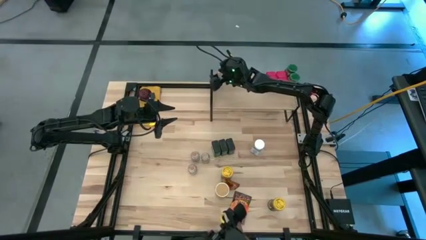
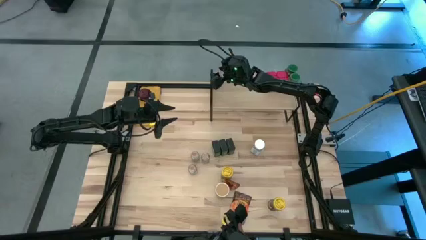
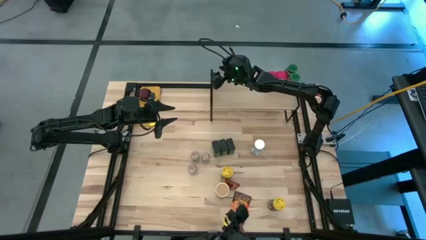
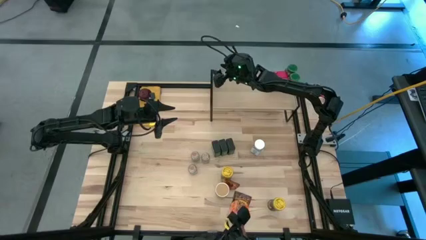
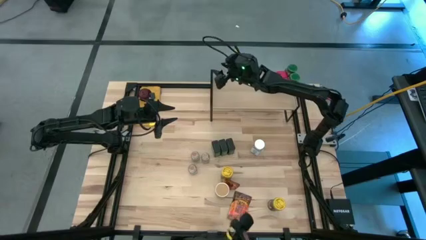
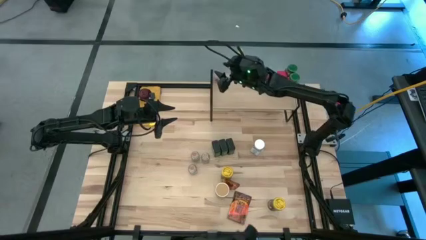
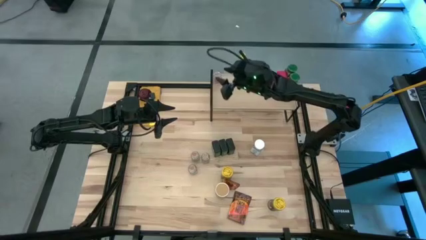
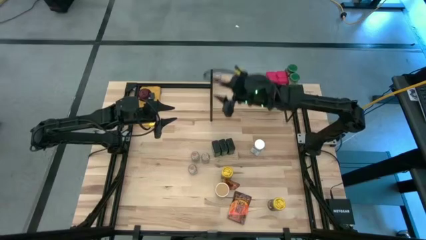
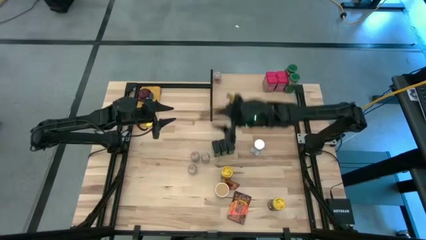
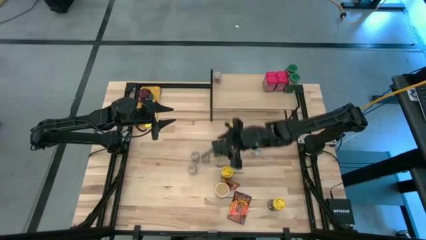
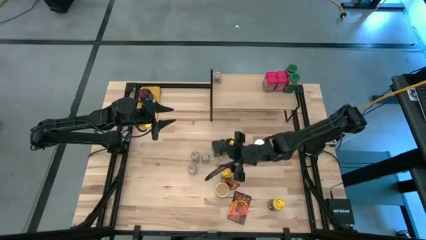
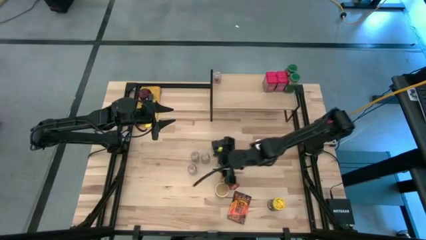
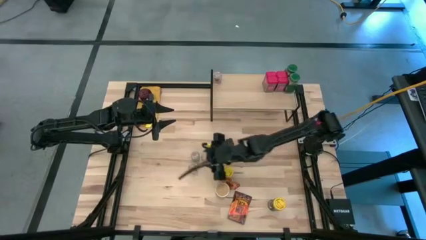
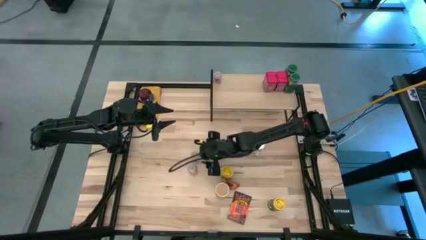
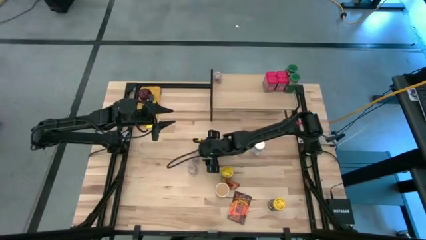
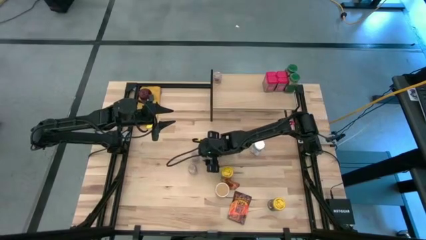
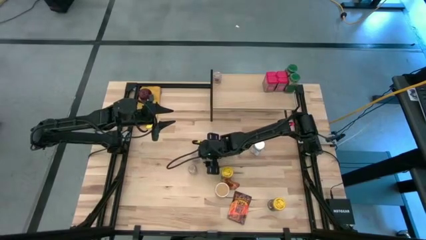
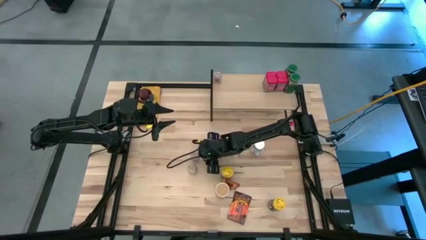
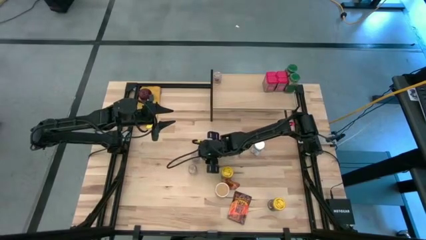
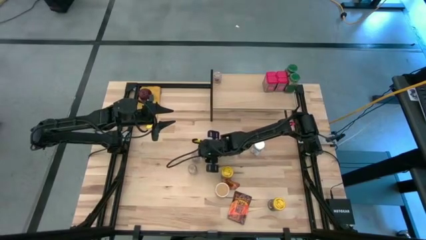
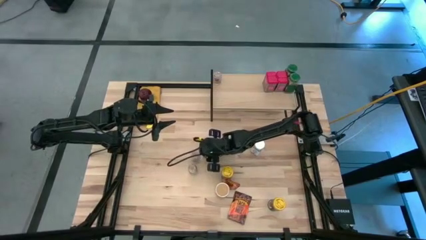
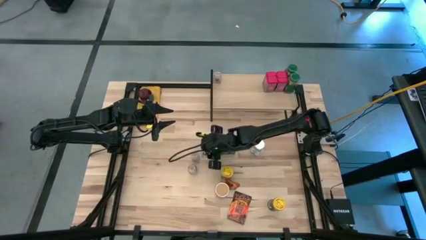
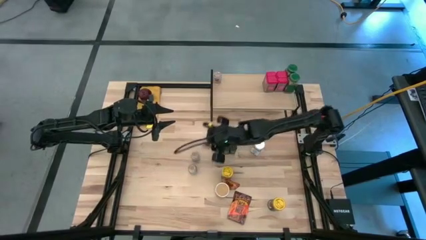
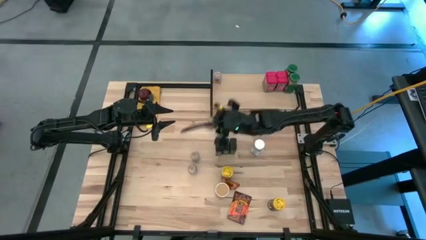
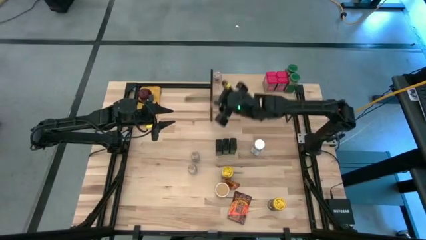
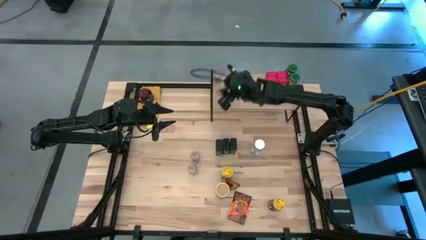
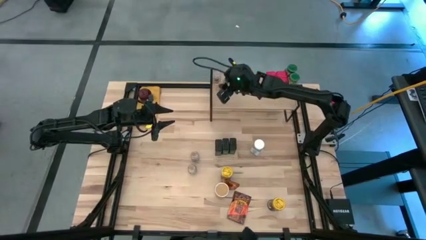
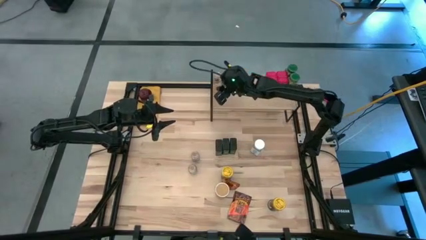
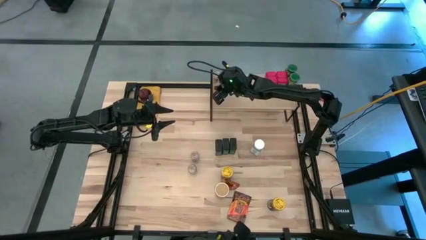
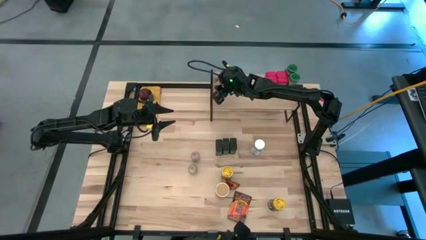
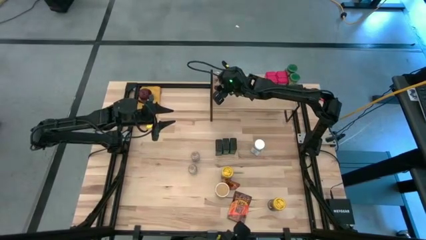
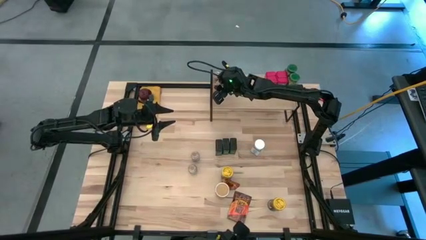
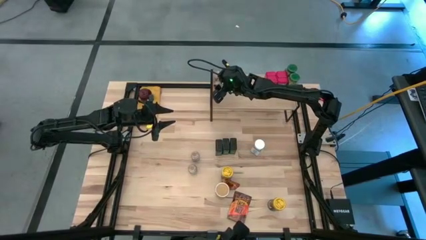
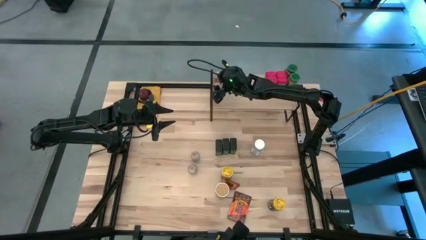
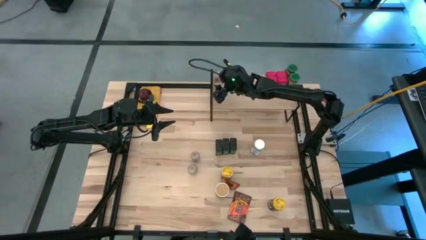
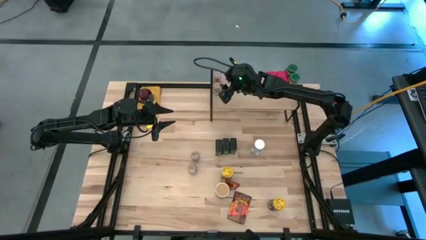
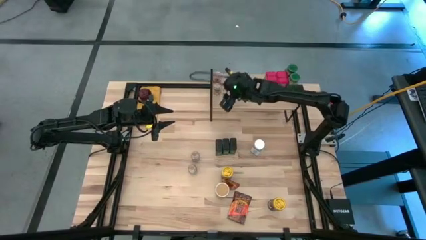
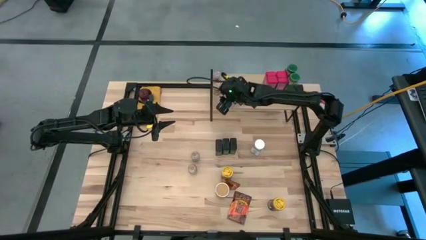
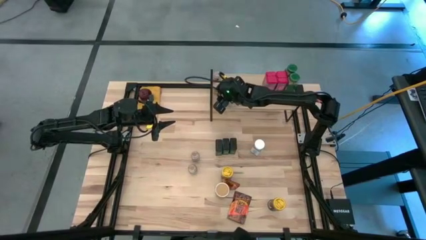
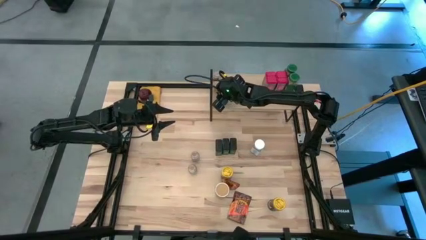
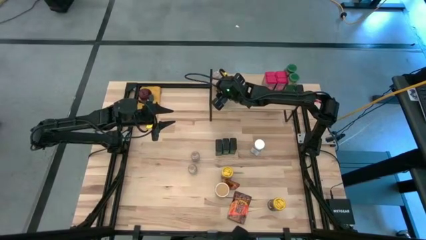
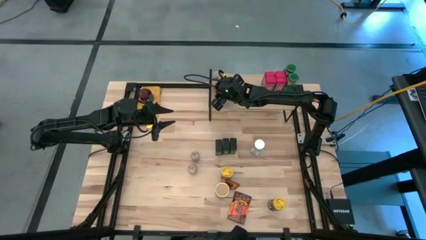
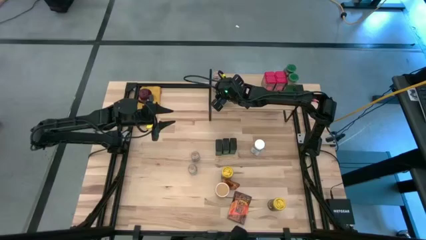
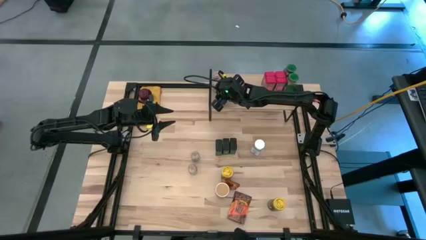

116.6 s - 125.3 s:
Task: Shelf spices
Put the top right brown seasoning bottle on the shelf and align it with the other brown seasoning bottle

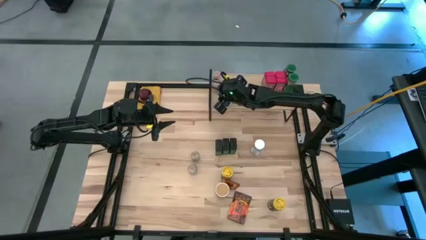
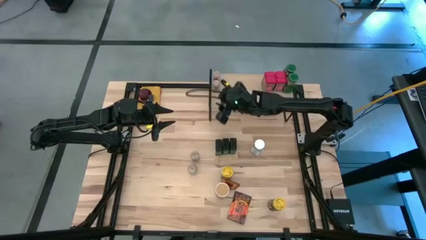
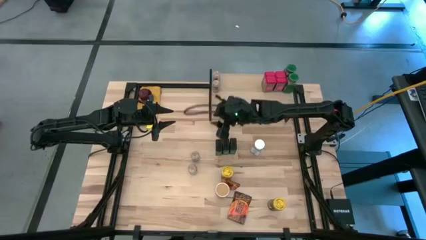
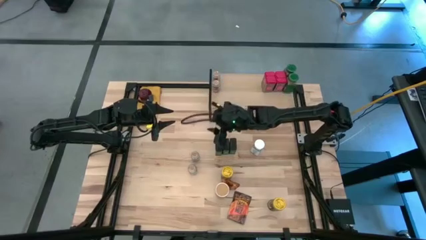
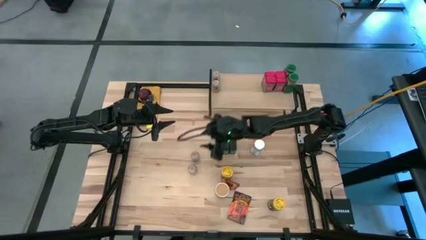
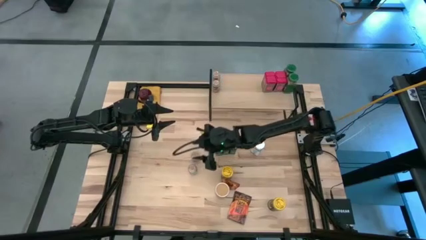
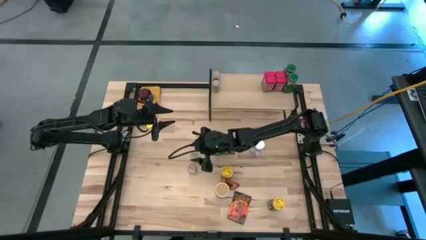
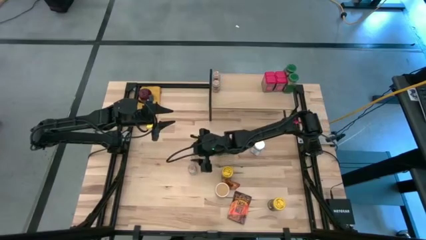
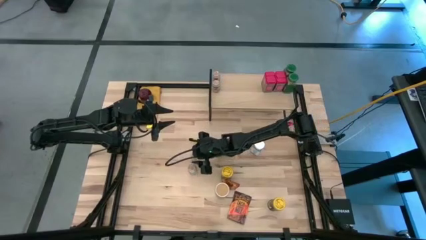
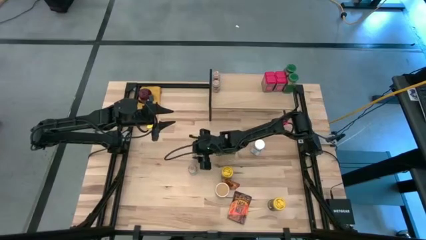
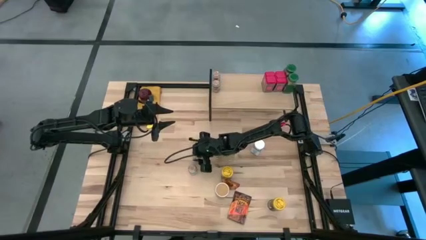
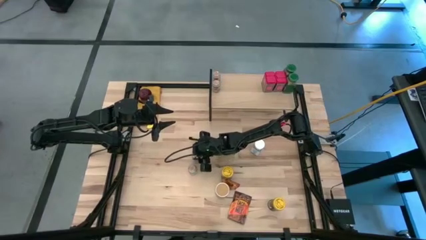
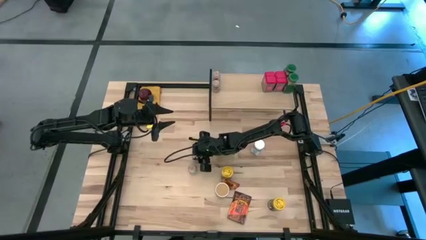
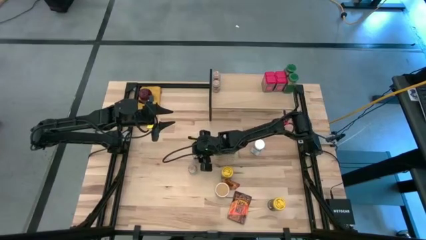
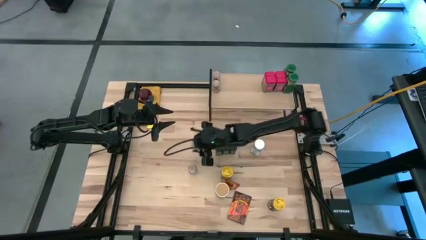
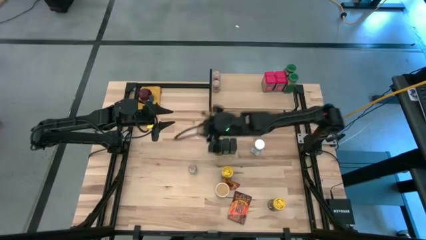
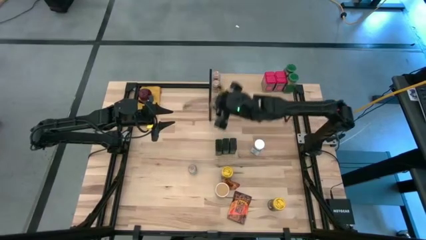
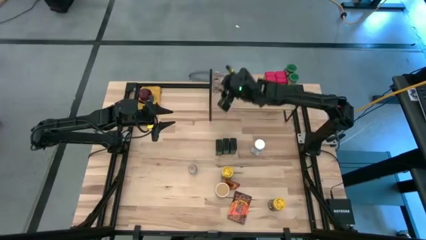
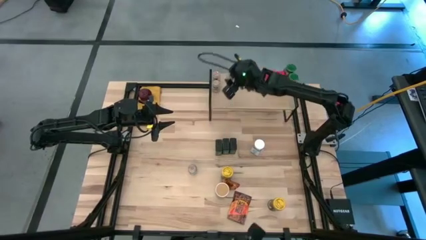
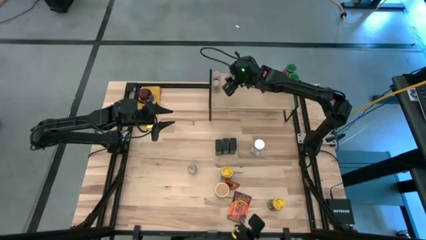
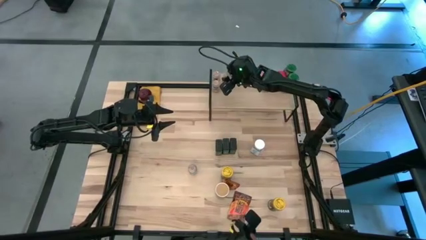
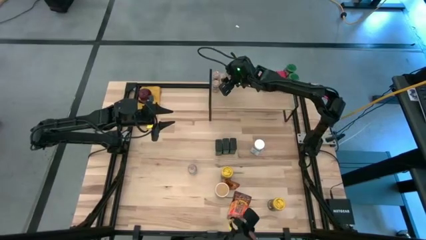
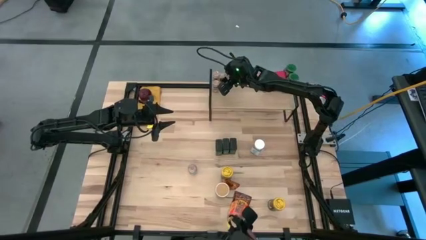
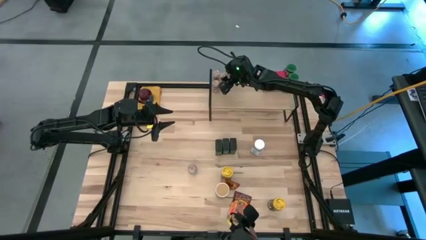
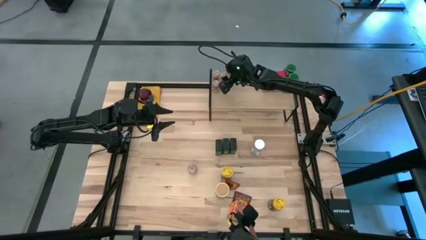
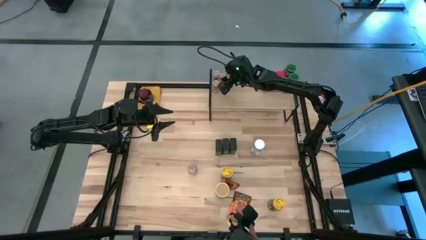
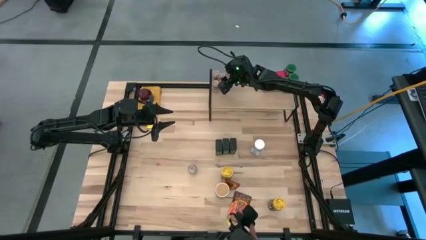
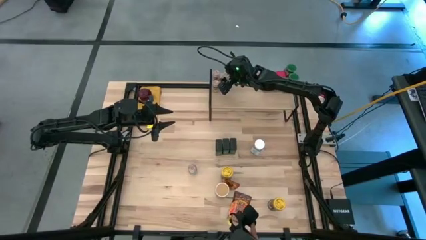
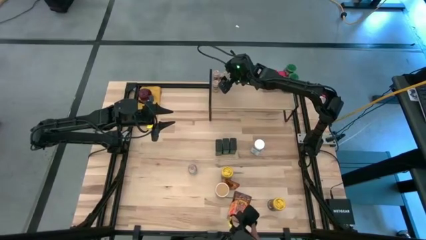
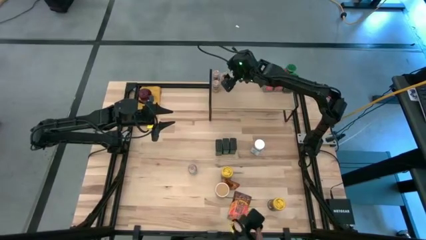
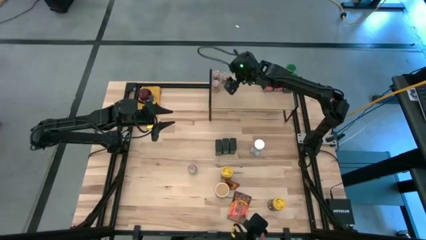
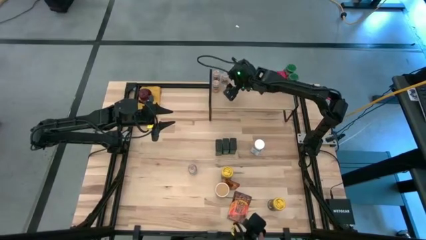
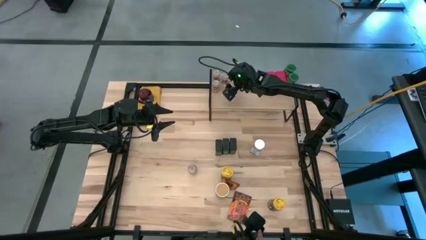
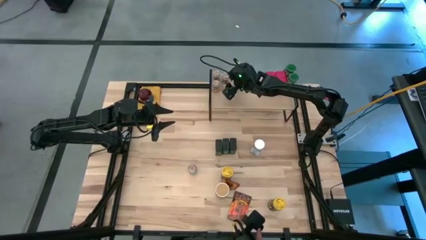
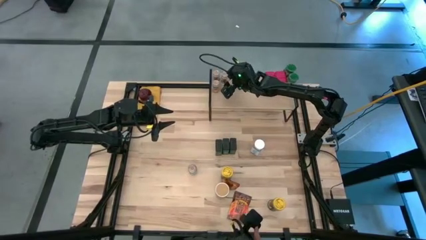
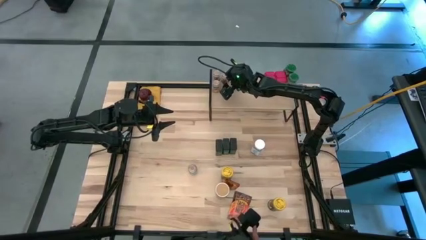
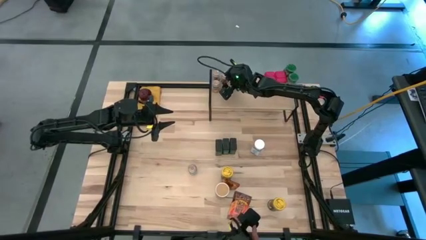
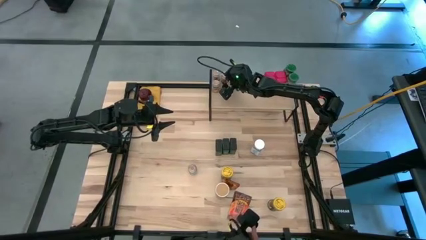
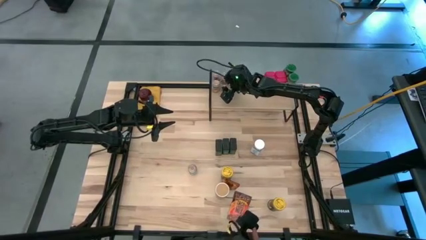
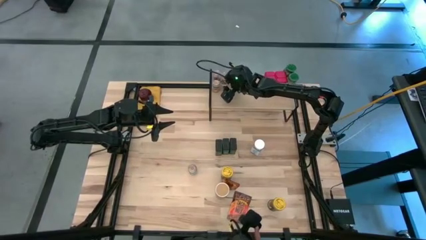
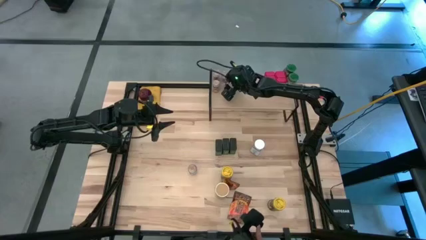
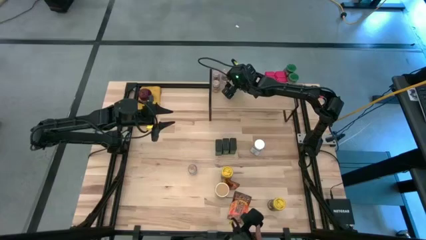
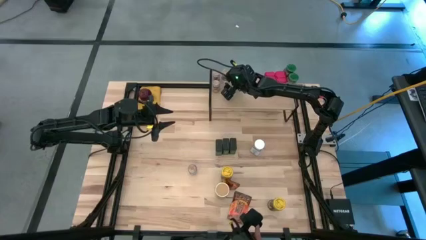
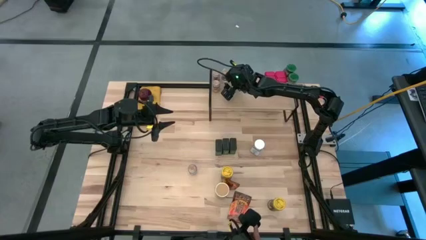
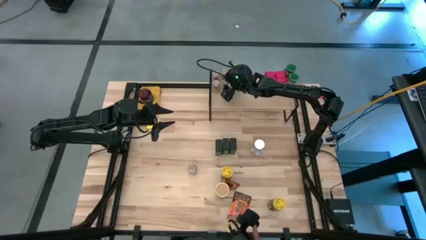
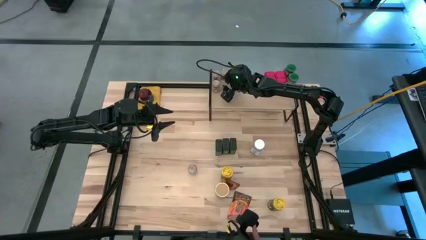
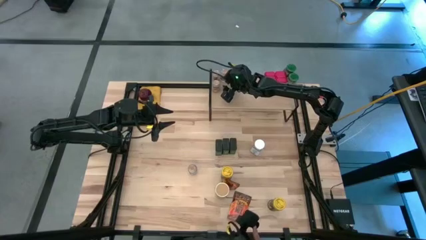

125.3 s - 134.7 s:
Put the top brown seasoning bottle on the shelf
